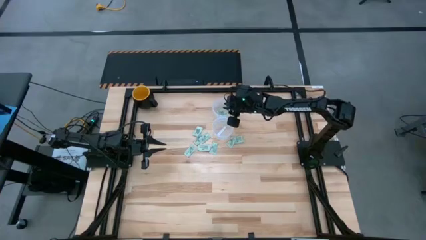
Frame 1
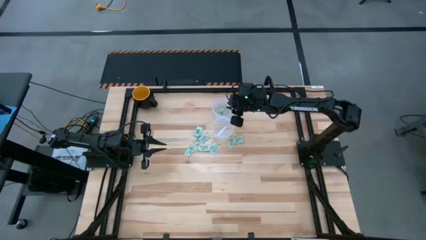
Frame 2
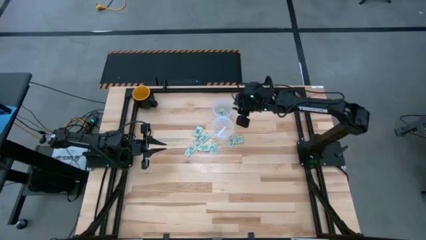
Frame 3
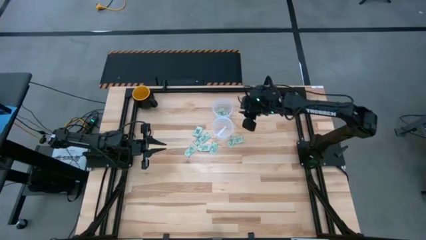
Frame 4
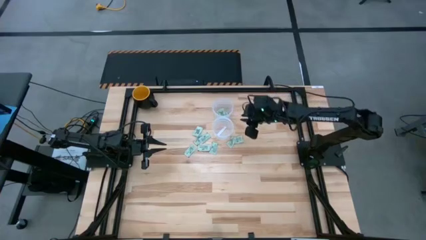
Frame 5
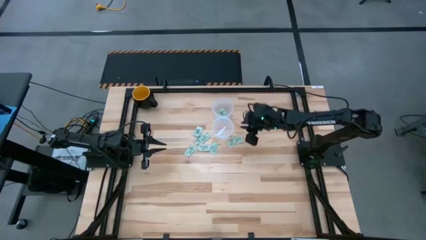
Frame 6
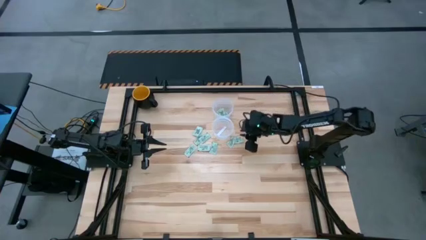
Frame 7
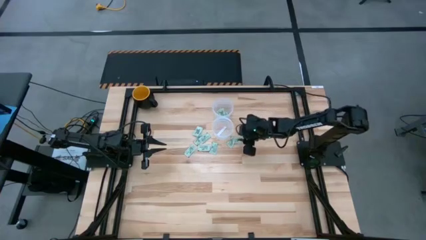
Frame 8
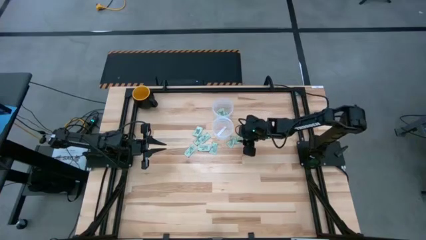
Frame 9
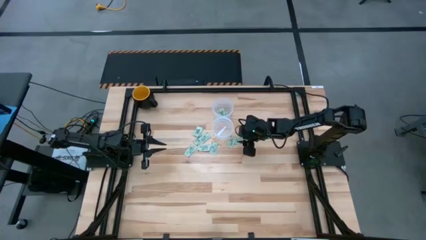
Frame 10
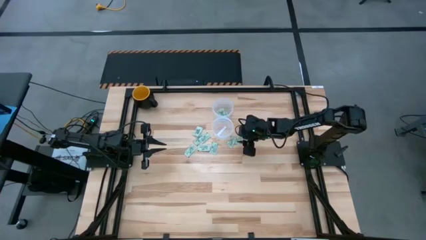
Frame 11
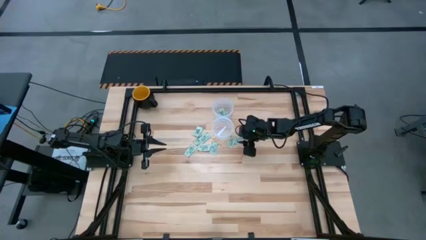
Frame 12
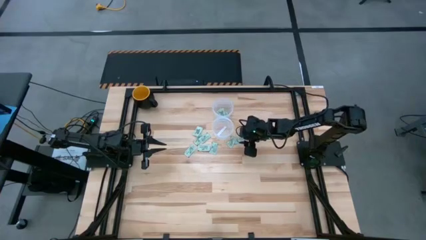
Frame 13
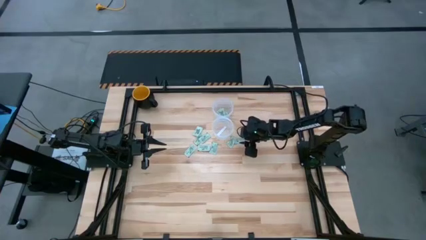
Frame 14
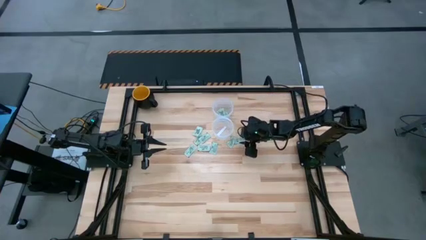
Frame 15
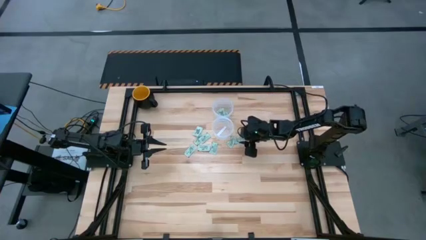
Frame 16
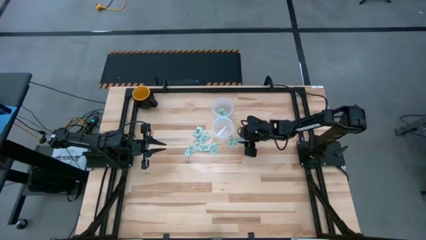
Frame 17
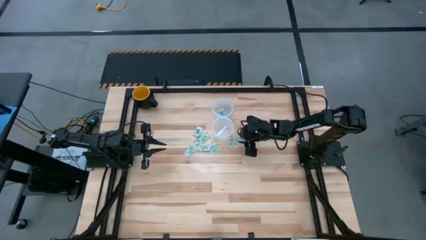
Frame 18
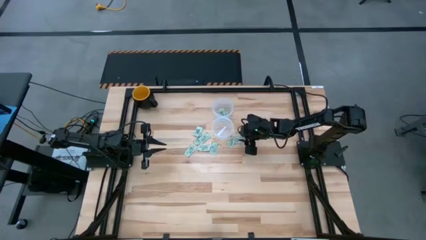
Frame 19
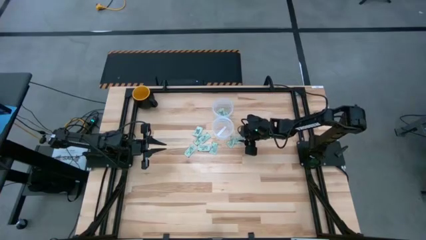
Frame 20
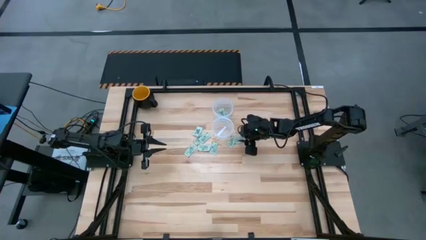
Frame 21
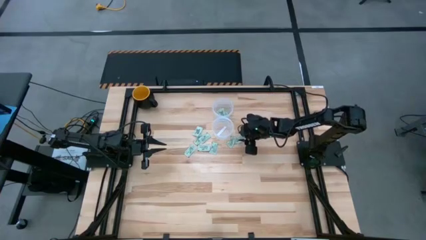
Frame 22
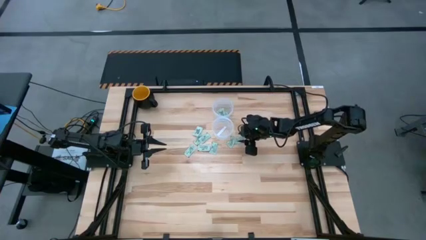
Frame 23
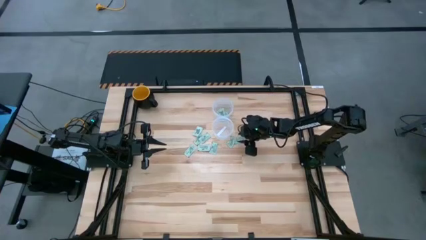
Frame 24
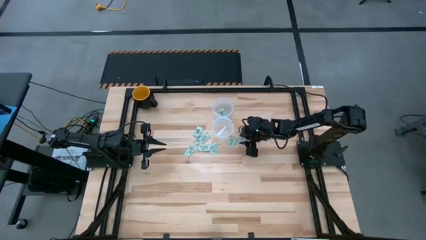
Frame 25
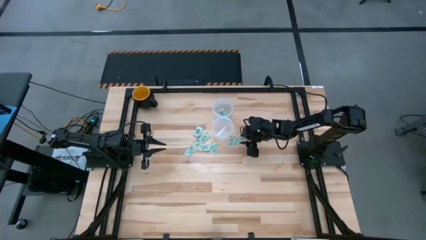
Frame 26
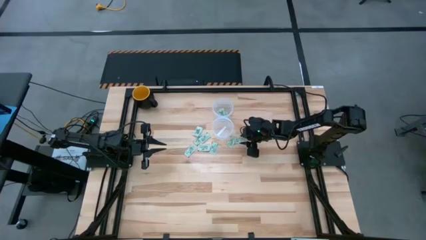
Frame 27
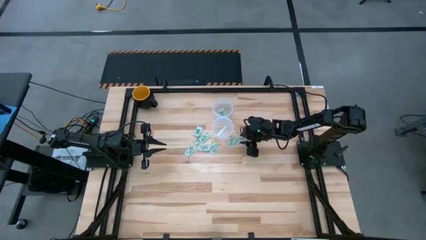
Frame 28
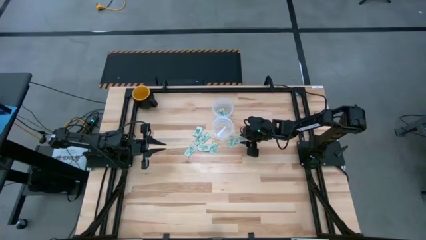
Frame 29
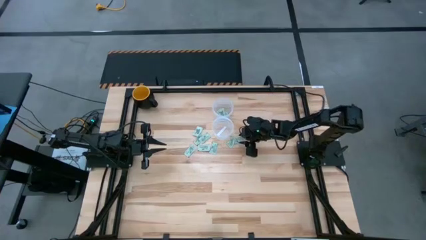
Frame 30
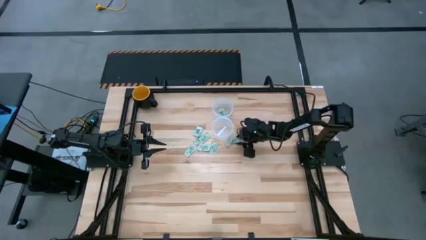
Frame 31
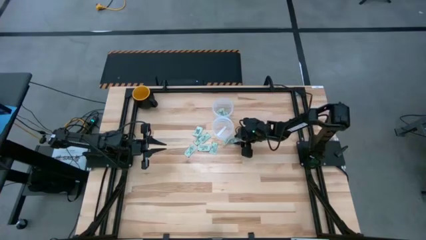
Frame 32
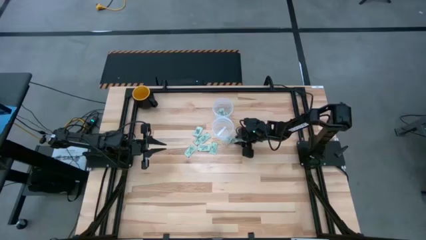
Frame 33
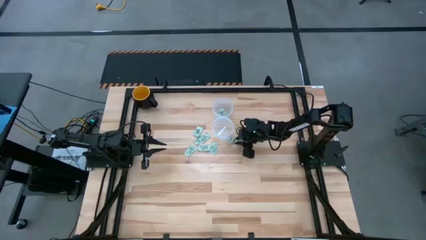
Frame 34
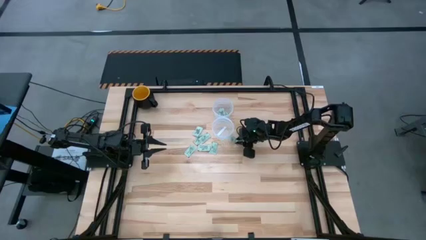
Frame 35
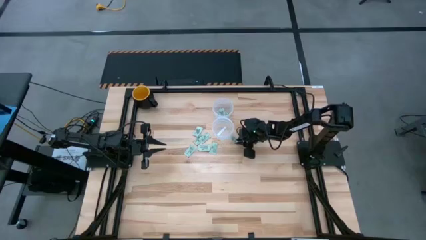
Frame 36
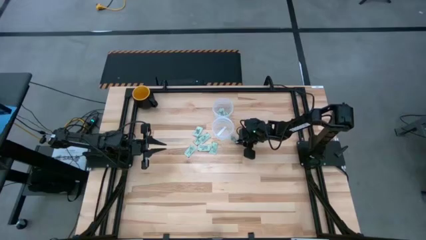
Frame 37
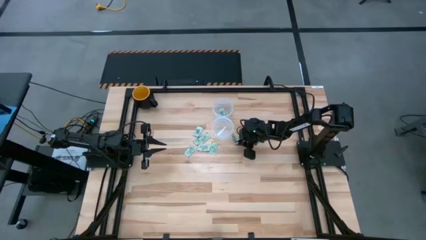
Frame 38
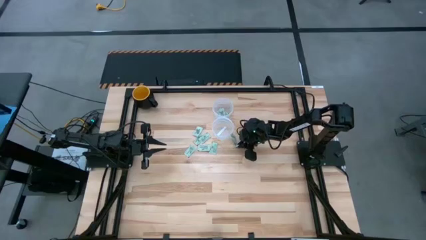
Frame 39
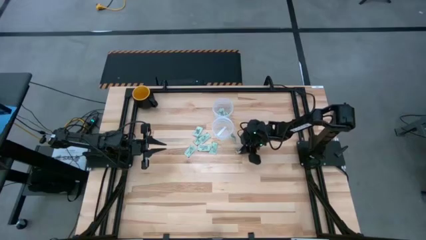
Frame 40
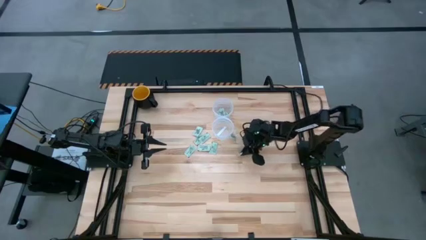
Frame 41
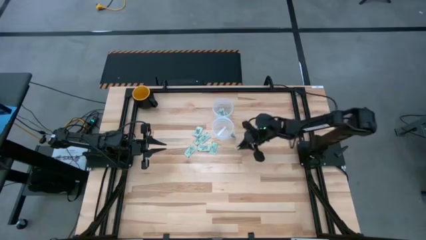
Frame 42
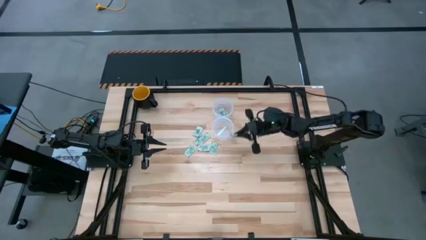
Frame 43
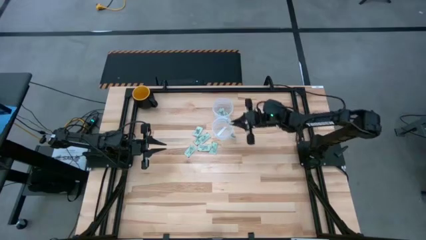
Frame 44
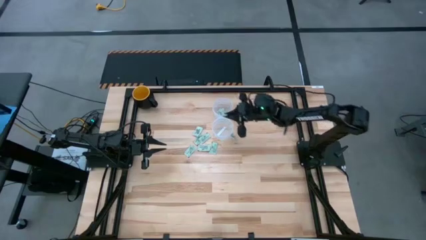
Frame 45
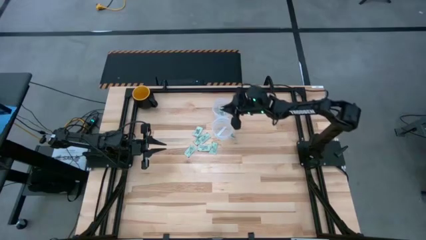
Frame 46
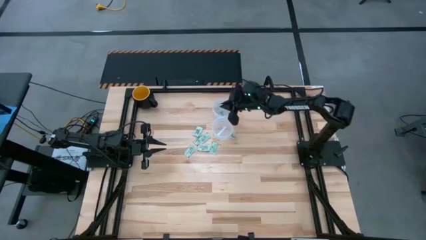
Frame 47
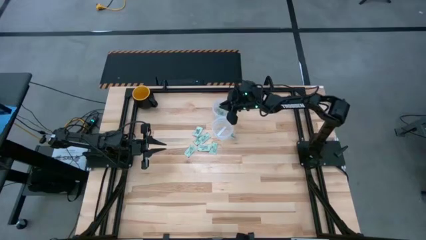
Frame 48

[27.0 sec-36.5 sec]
Task: Pick and place items into bin
Put the green stevia packet into the top transparent bin

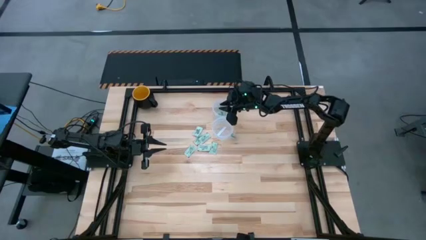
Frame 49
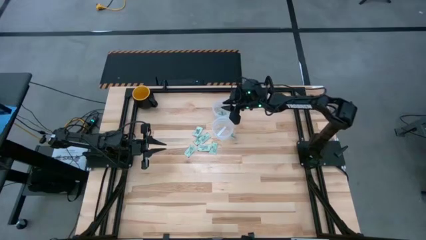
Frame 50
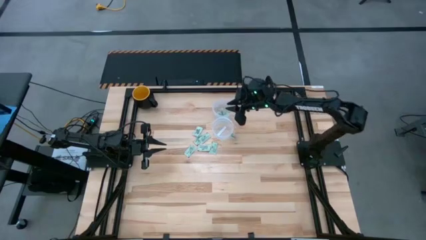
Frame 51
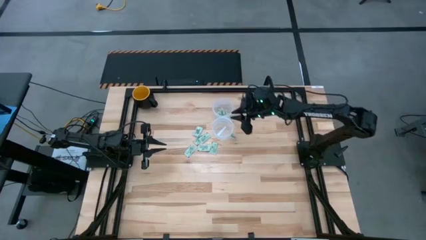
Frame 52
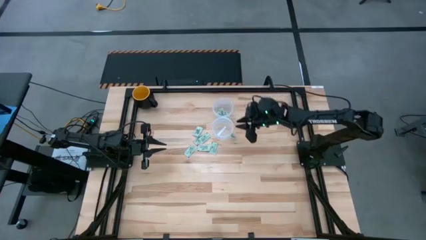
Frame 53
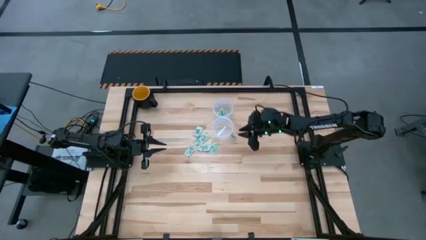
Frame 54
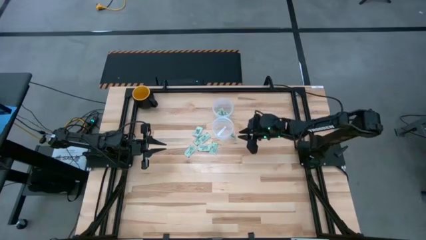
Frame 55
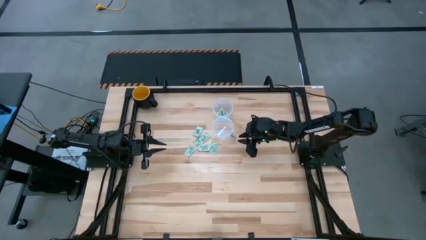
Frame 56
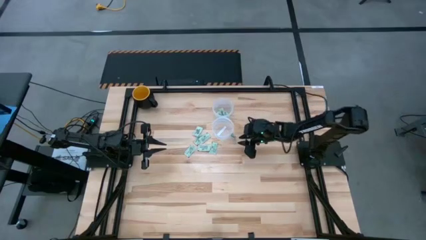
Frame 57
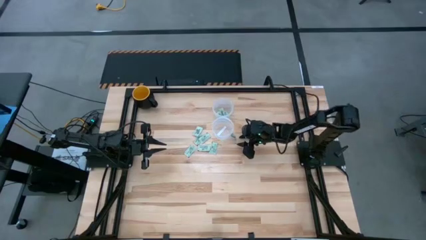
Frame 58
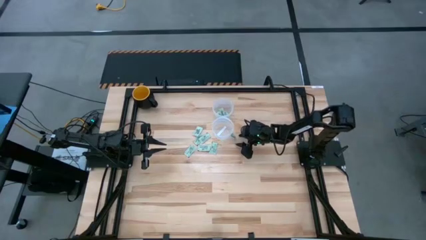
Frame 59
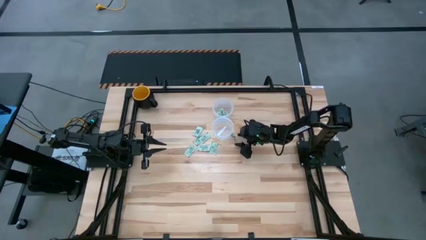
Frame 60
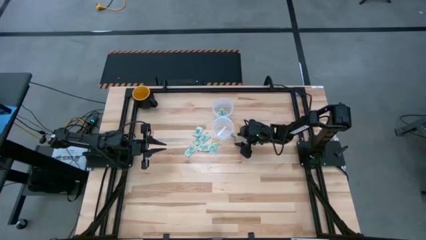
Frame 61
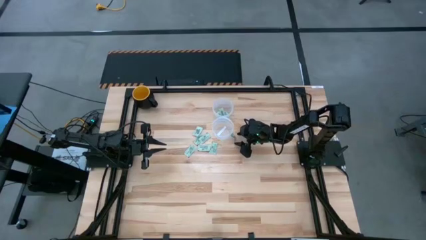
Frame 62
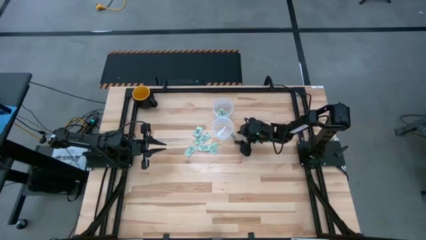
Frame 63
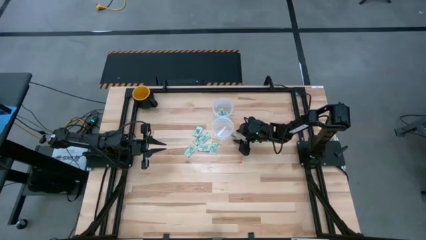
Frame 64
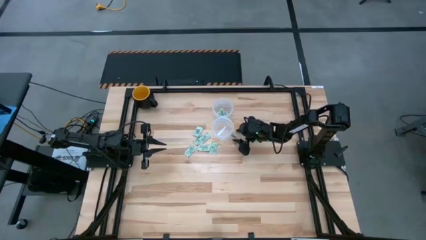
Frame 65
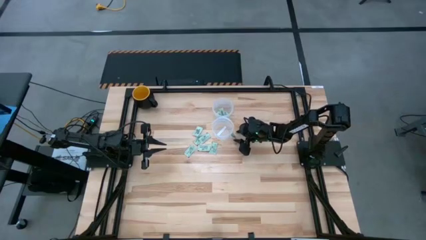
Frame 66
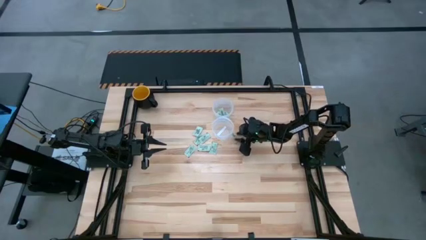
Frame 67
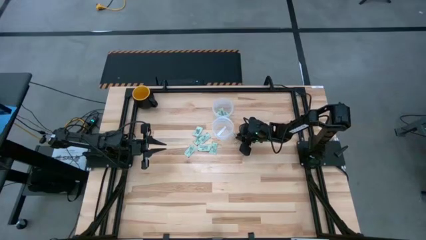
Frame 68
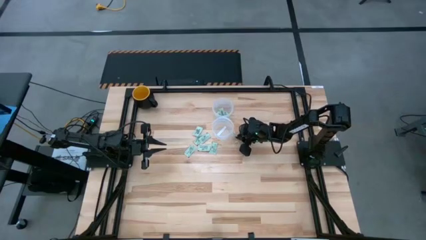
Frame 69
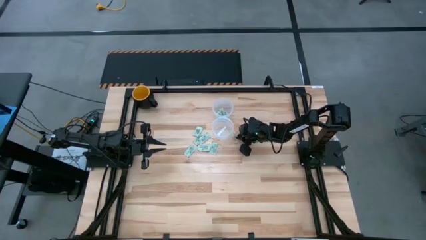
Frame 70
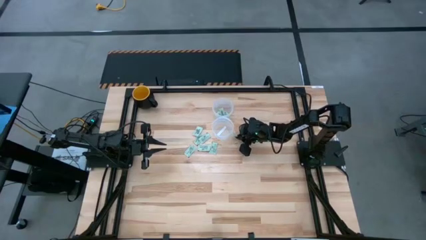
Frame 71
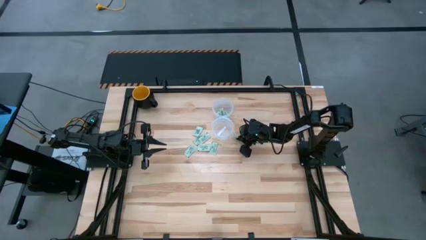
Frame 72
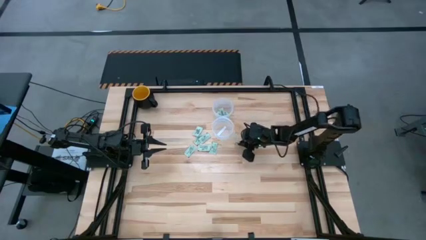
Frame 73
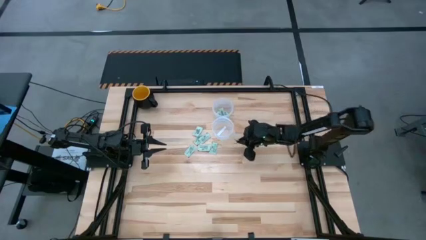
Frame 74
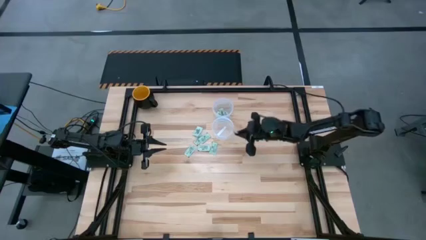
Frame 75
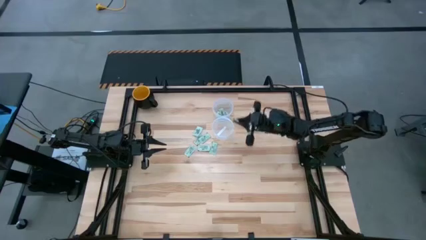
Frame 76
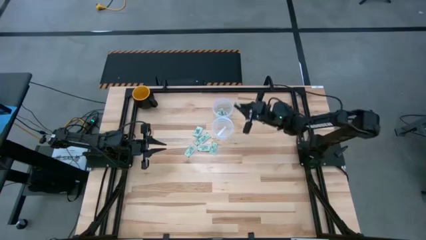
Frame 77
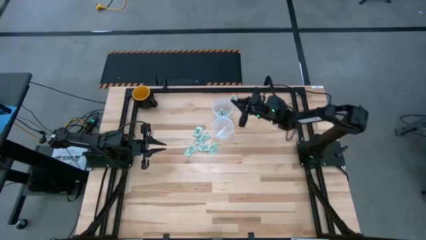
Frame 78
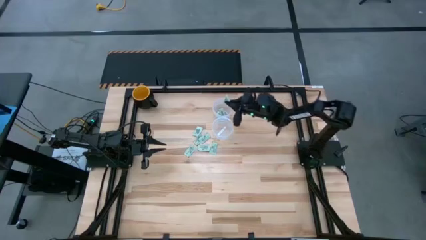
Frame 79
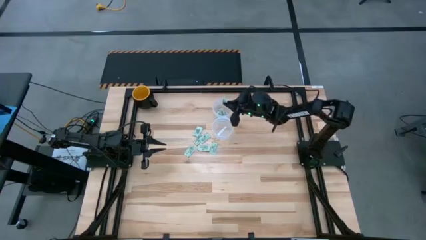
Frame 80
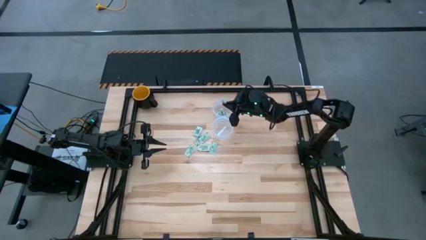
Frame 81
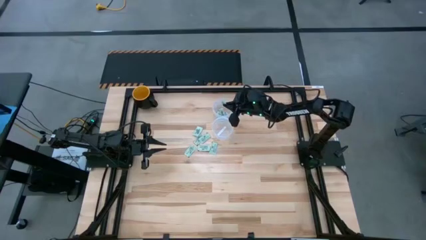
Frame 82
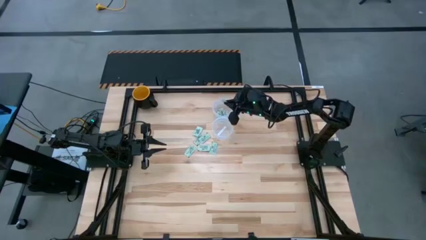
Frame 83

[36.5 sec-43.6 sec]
Put the green stevia packet into the top transparent bin
